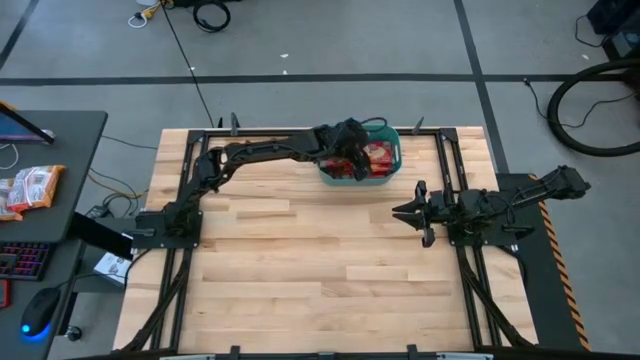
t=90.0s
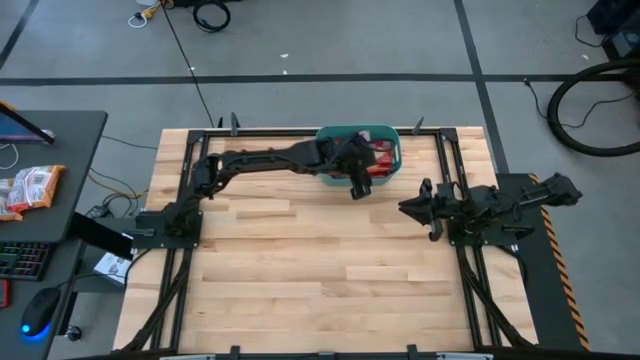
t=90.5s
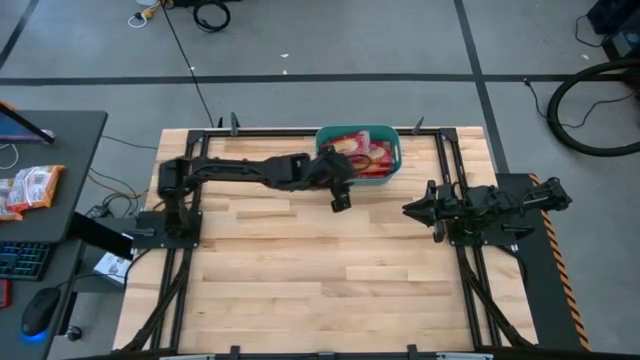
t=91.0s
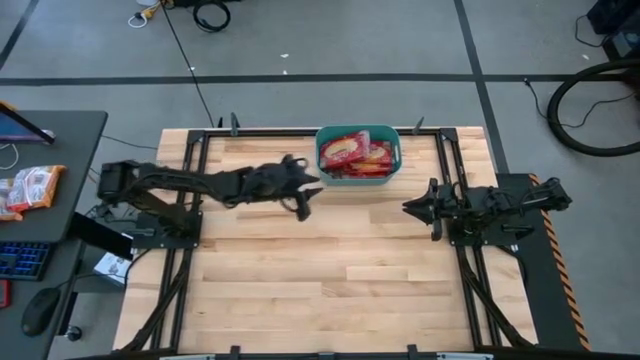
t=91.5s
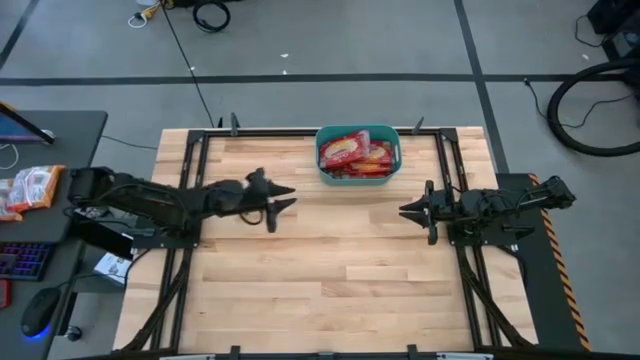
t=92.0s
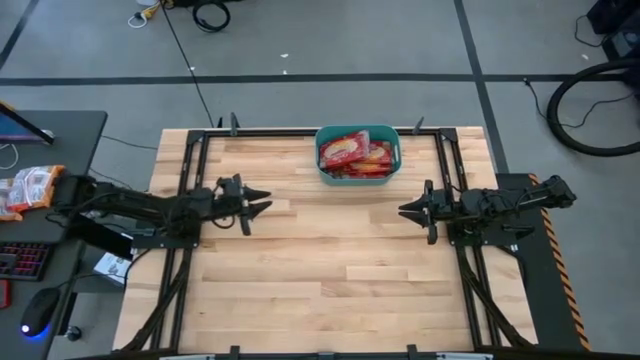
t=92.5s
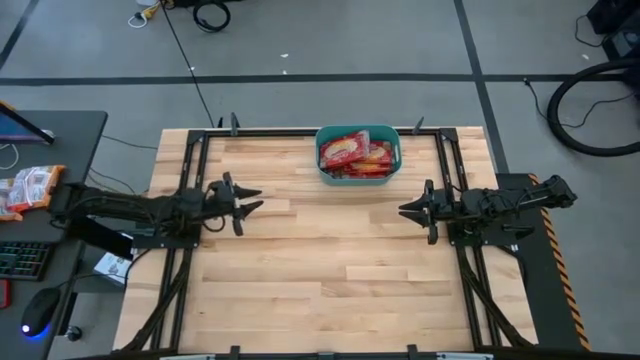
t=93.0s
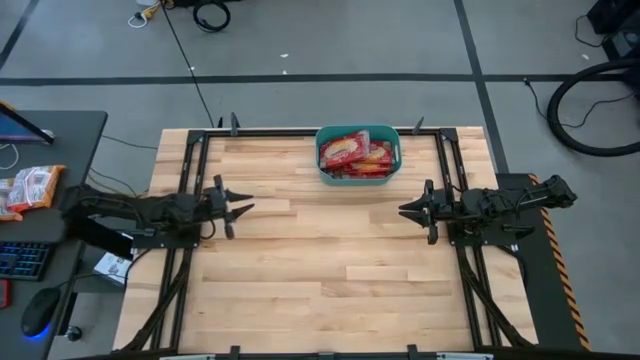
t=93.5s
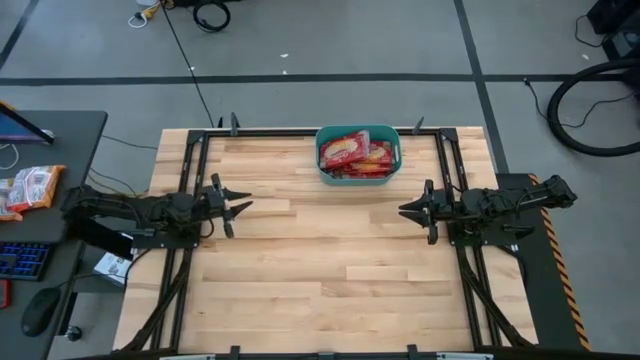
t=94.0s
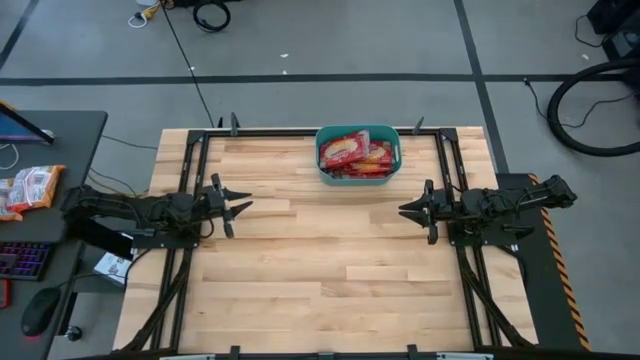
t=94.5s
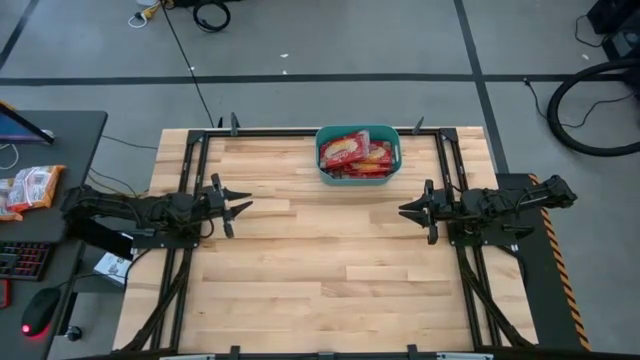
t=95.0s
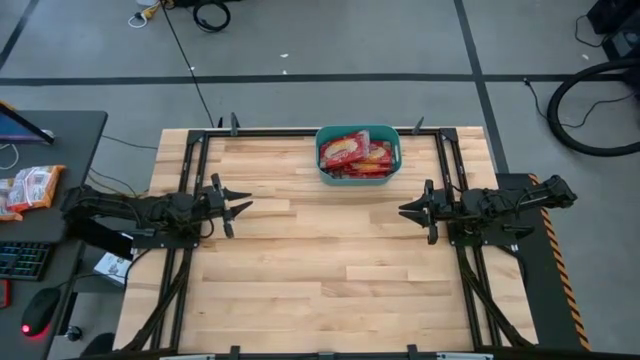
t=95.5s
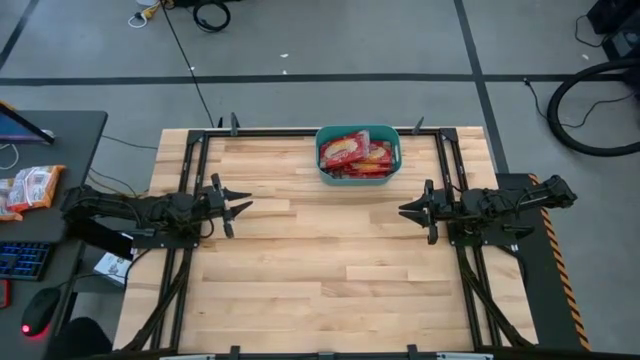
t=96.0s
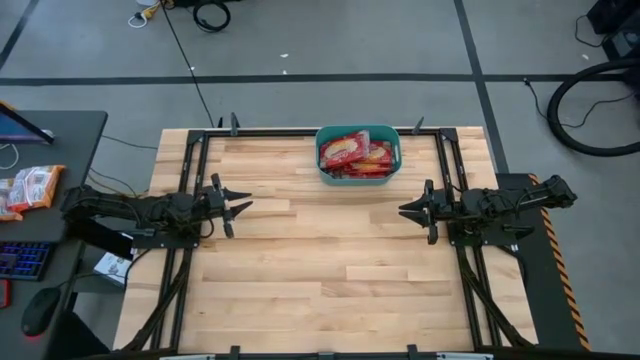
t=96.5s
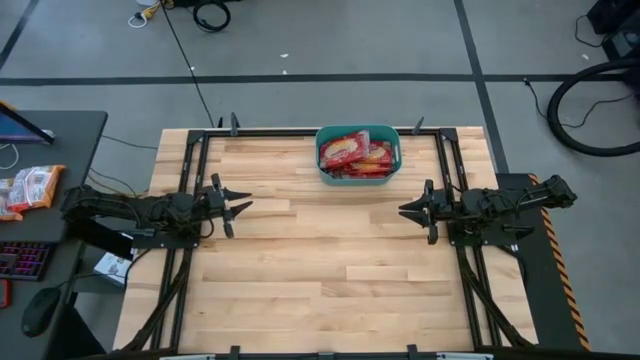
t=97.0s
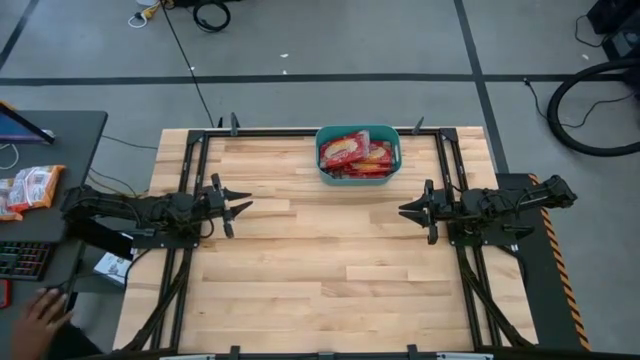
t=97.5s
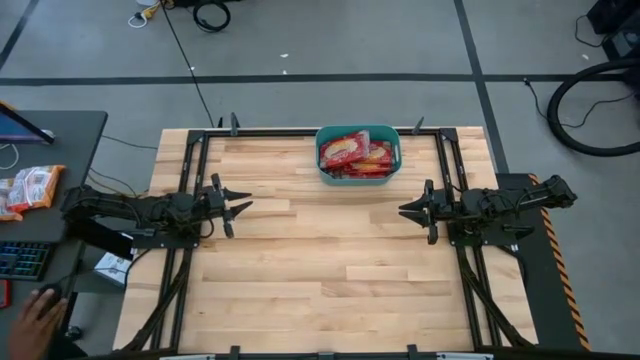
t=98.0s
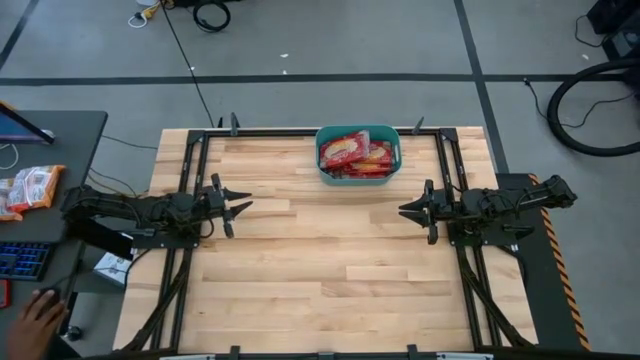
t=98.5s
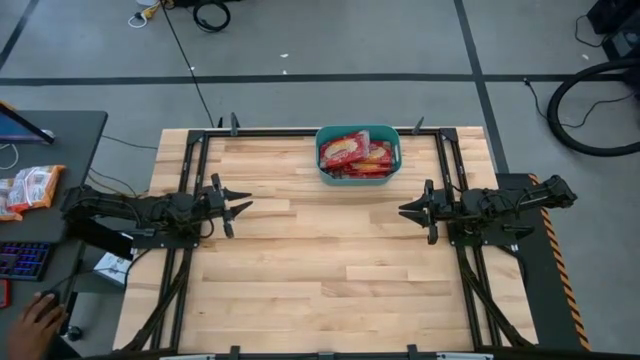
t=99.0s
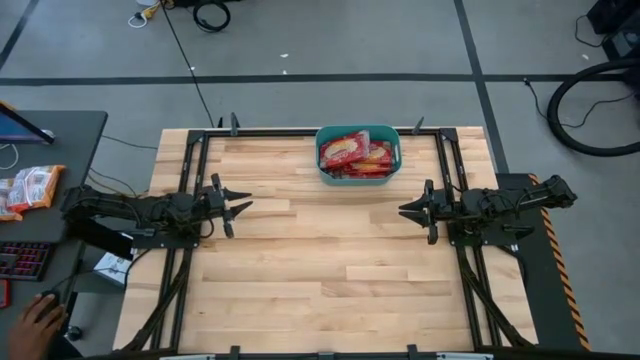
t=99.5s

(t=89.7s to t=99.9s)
Task: Sort popcorn bags into baskets
Return to Home Position

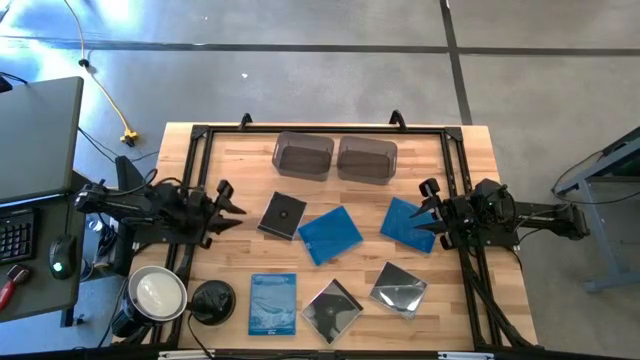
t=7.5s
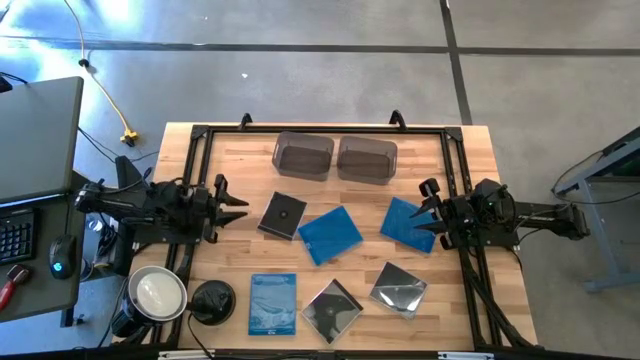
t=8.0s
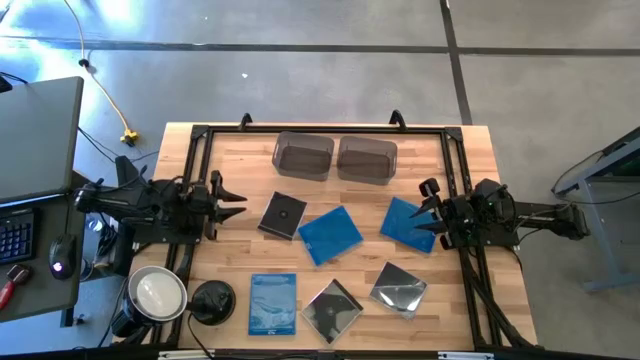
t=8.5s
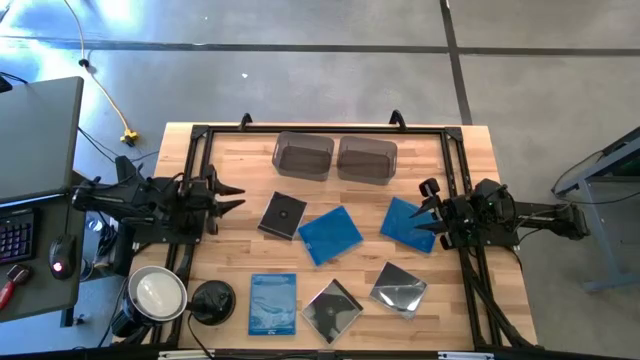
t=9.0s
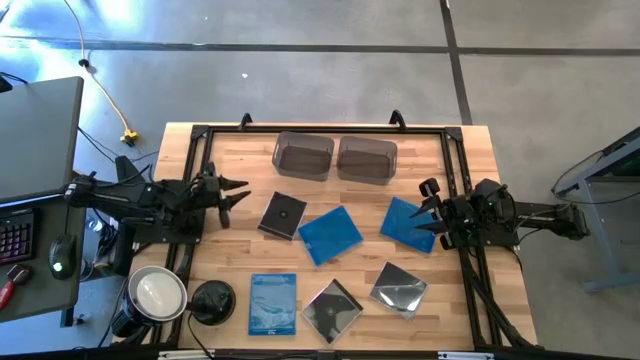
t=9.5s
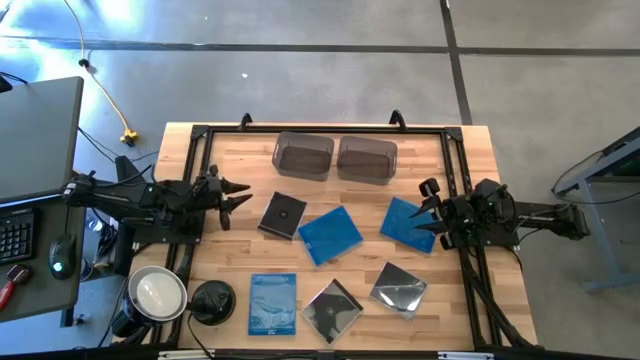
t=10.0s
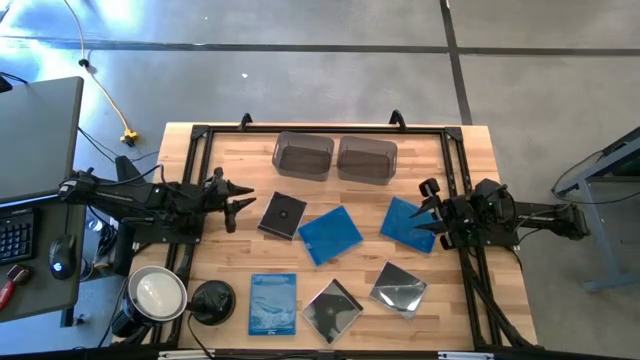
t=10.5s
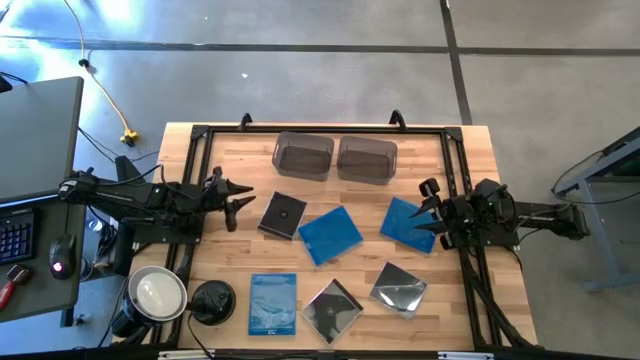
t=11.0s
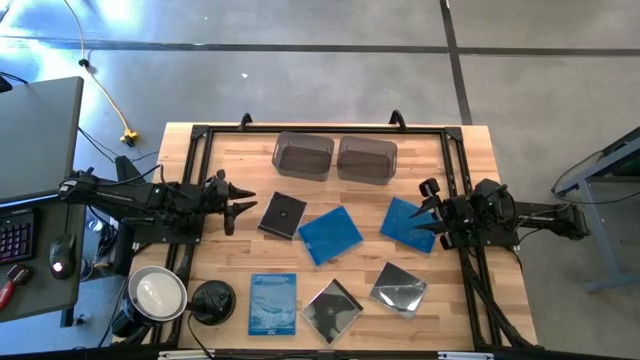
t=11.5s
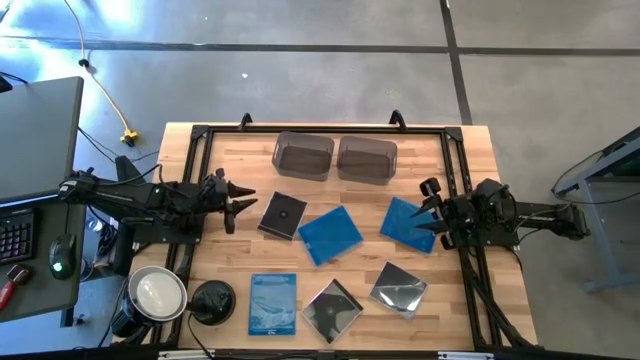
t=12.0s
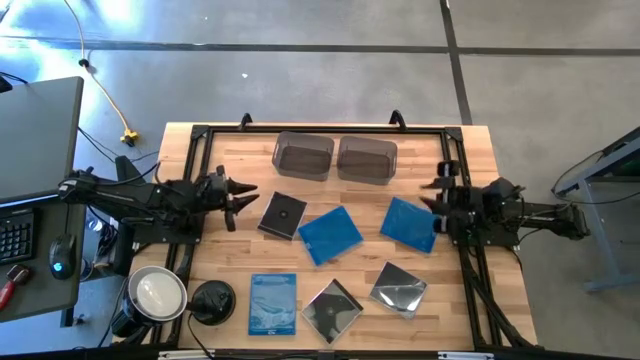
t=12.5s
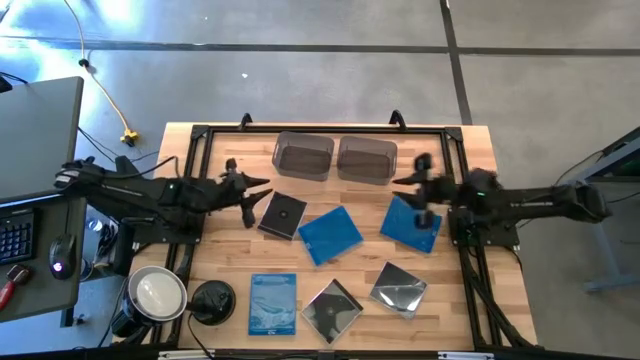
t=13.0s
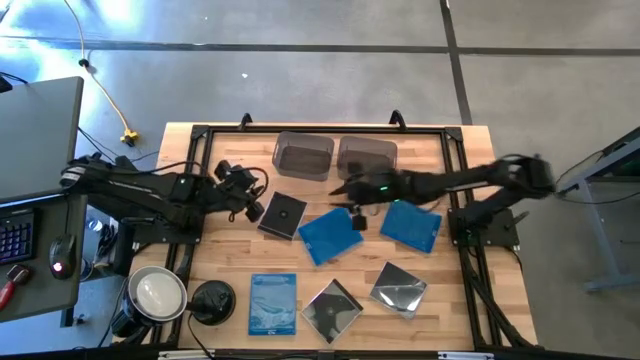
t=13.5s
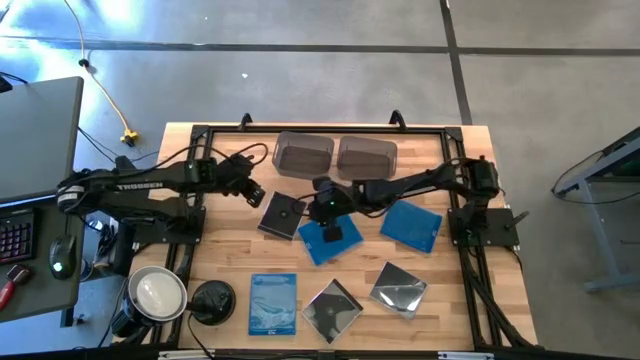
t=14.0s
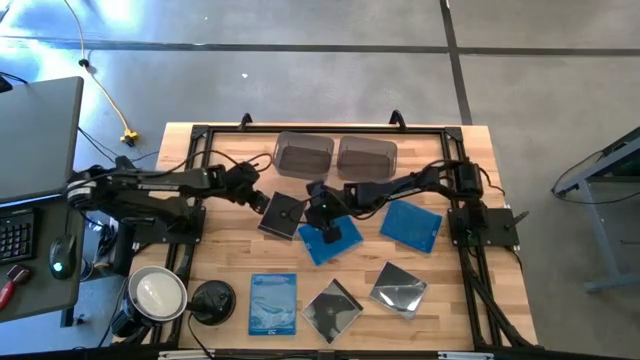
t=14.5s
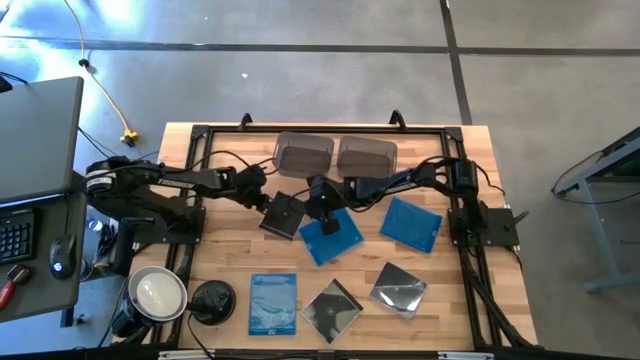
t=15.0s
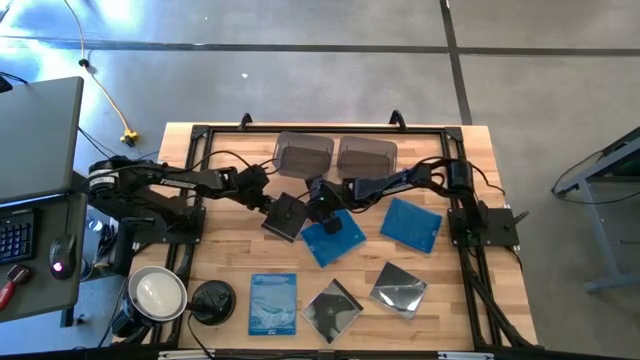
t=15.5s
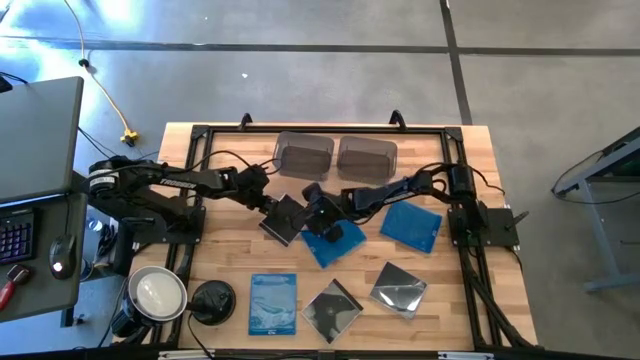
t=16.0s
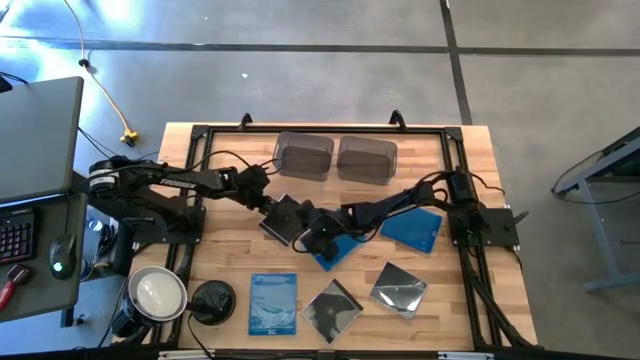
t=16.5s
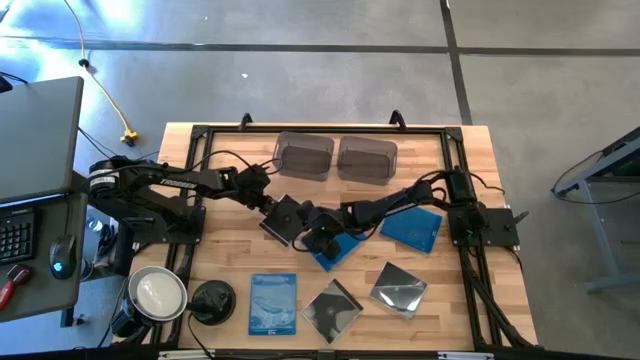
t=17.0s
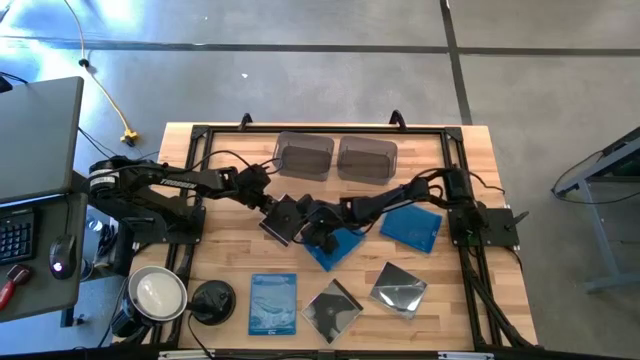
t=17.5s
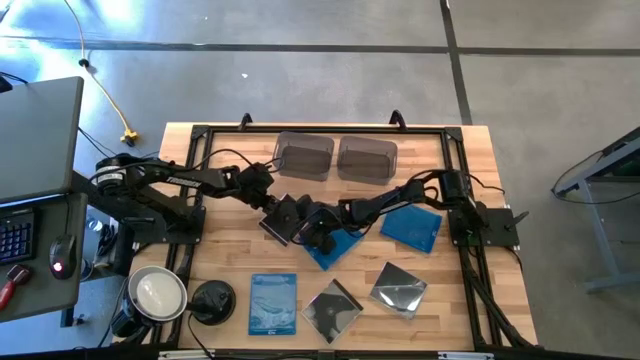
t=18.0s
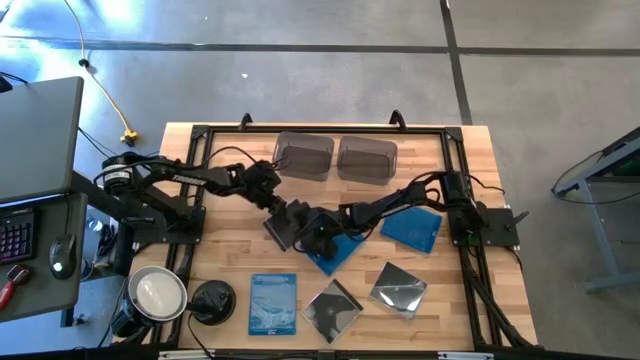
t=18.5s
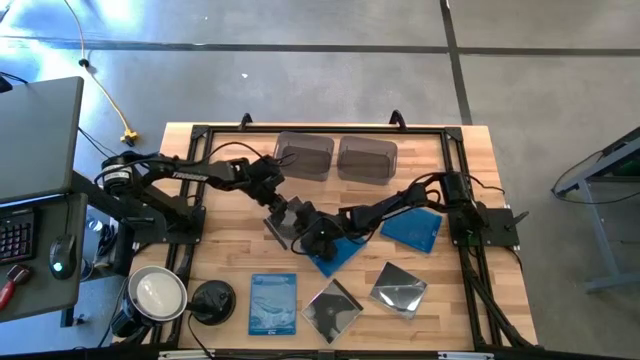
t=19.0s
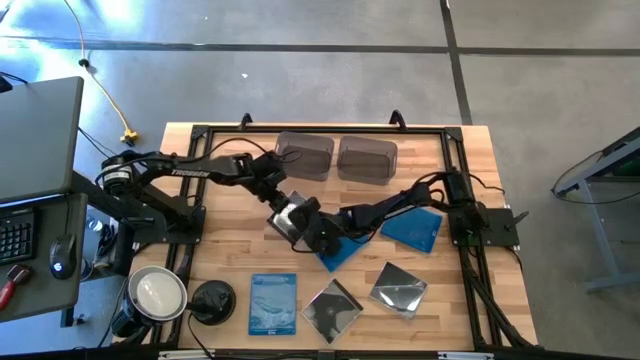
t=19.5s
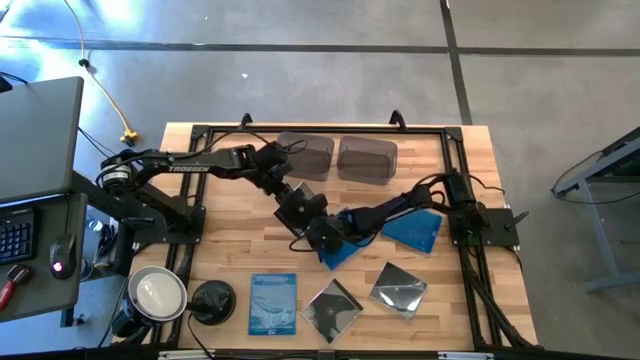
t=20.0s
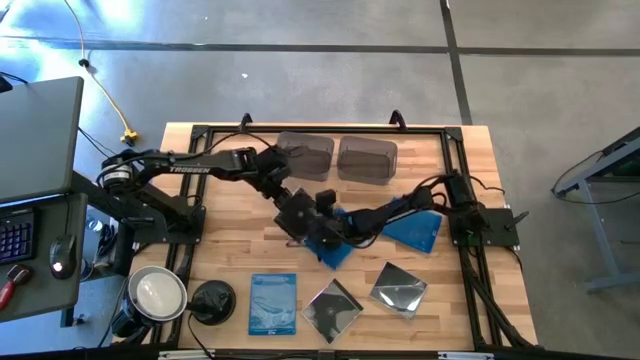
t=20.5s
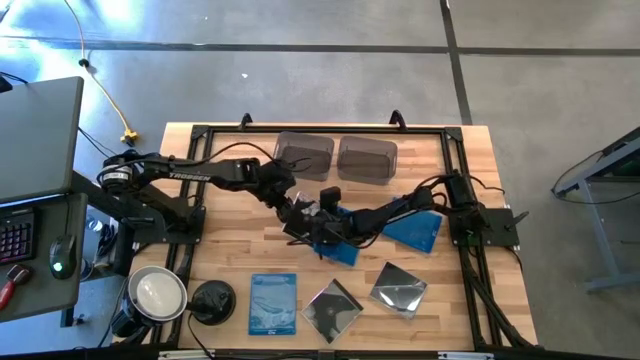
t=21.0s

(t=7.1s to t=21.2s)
Task: Pick & place jewel cases by type
Put the top black cd case into the left black bin
